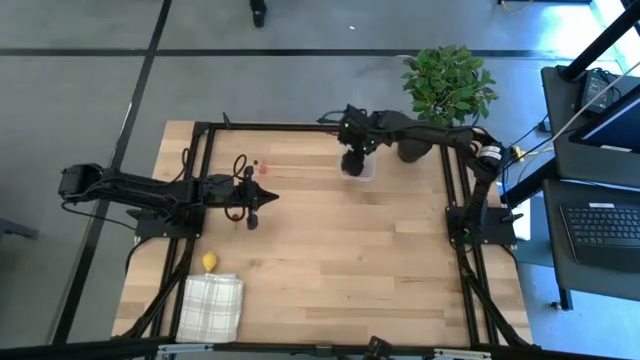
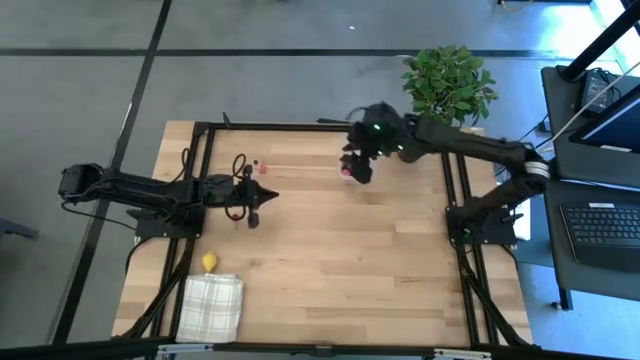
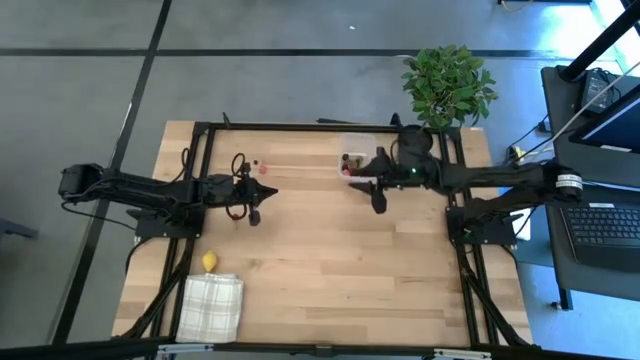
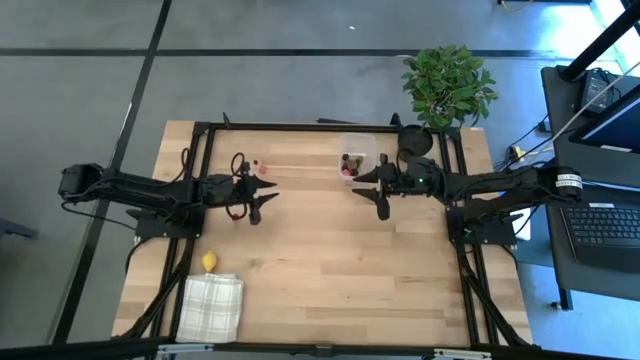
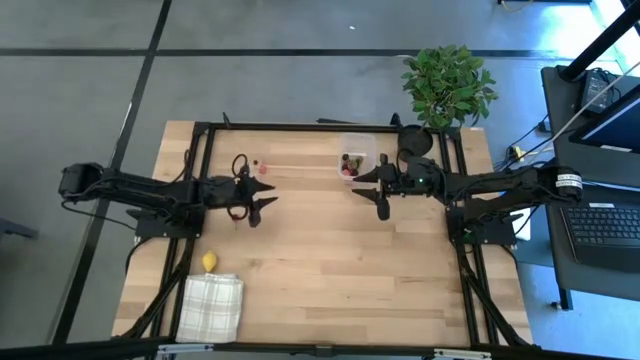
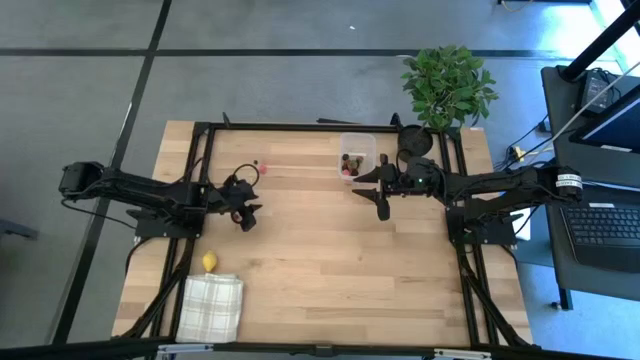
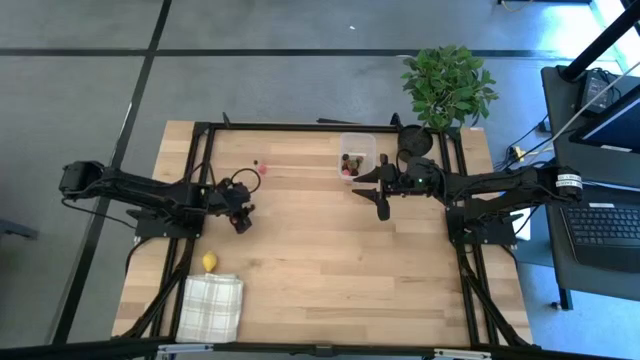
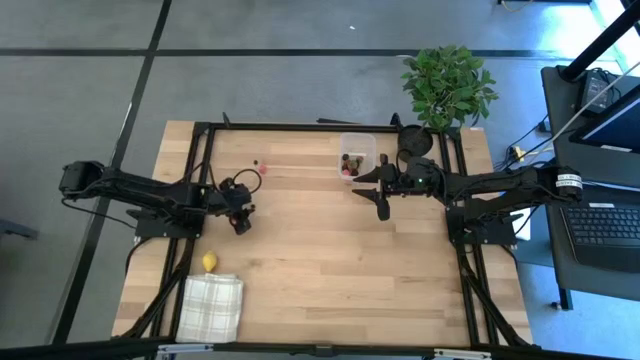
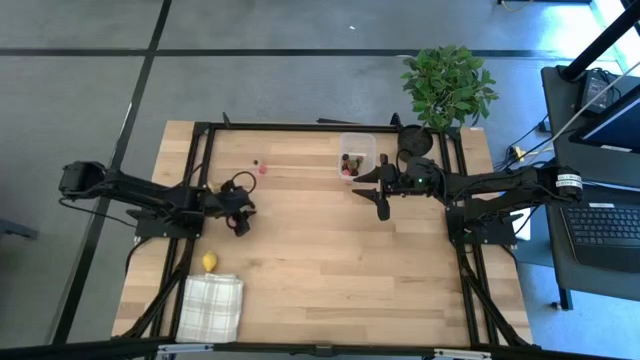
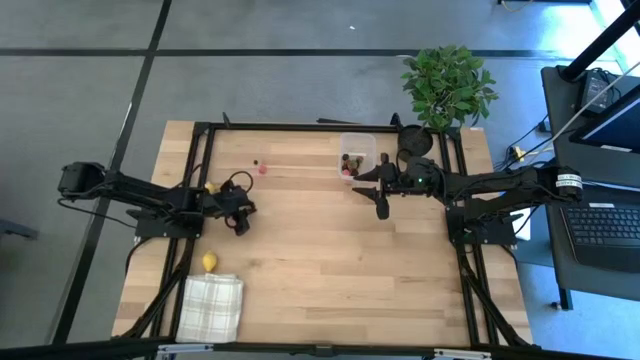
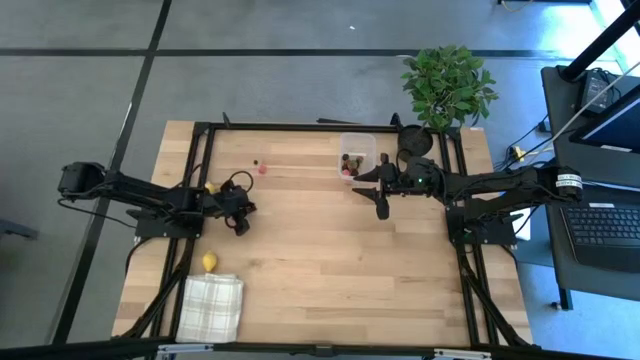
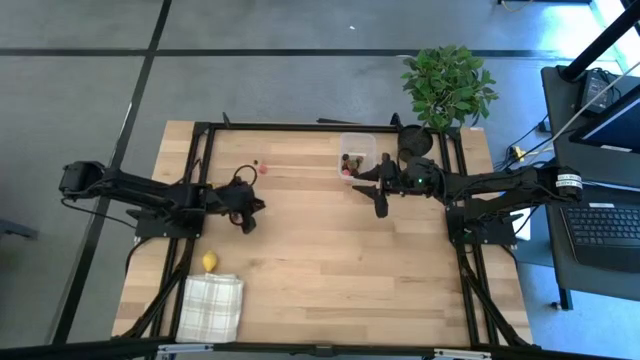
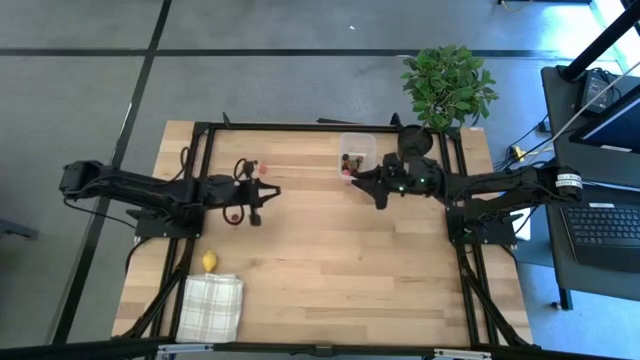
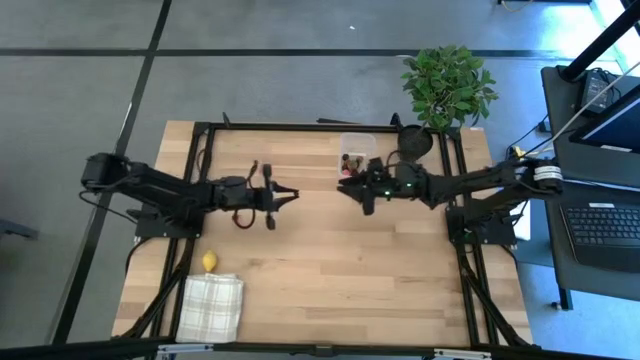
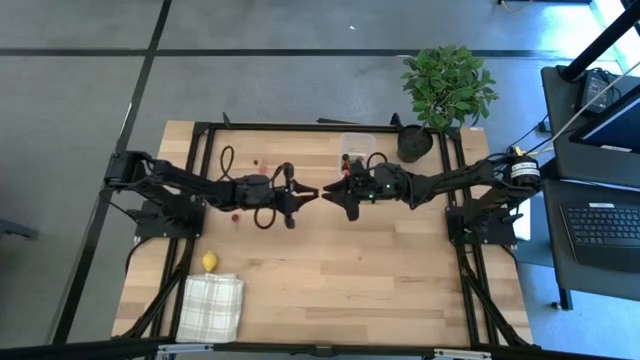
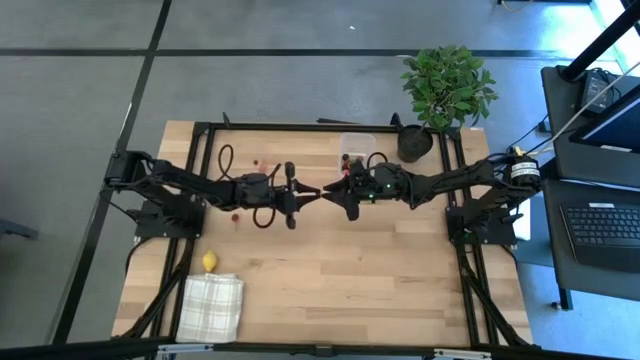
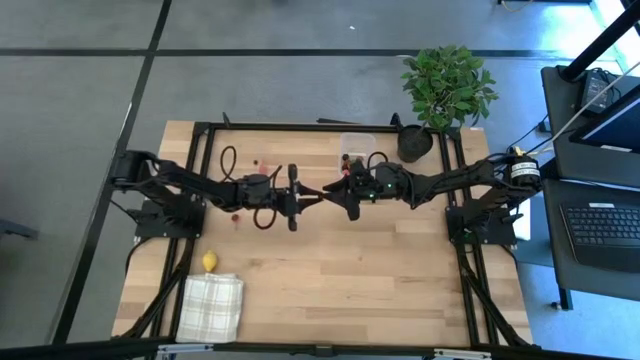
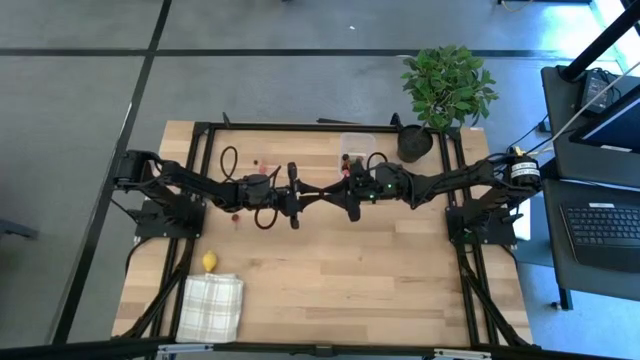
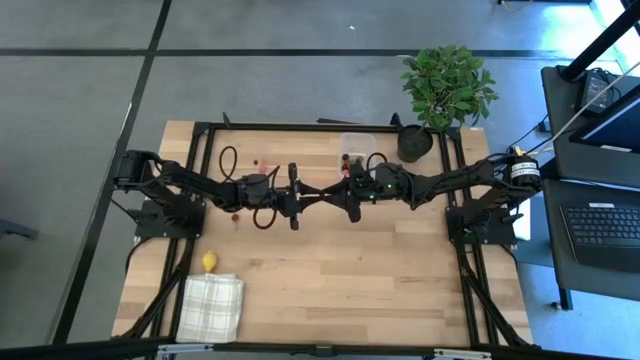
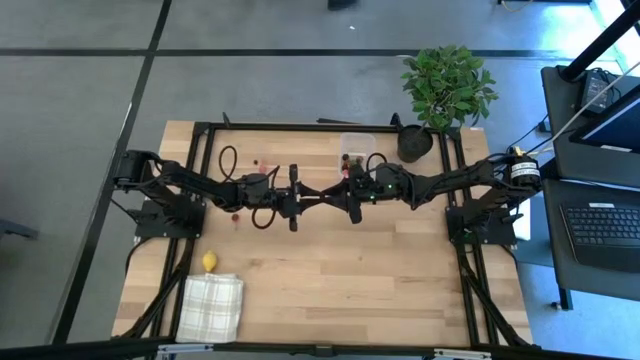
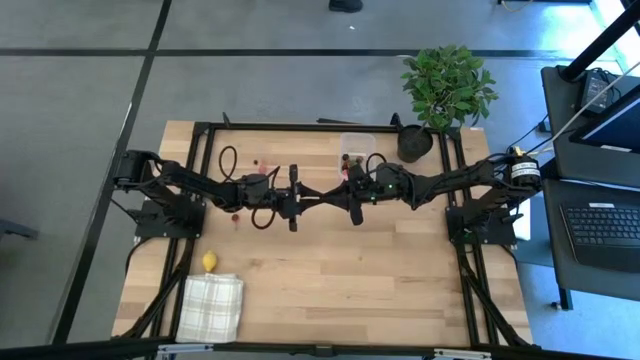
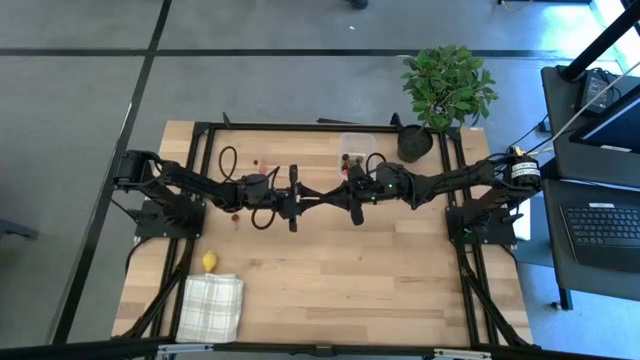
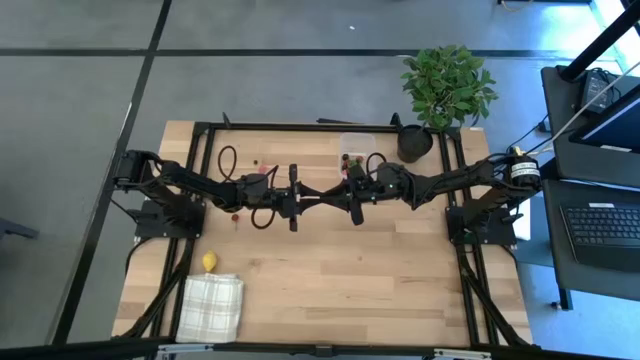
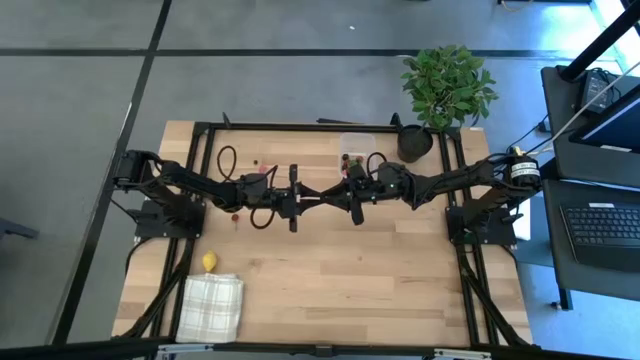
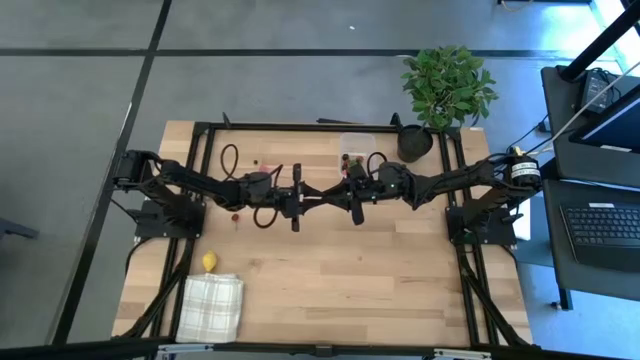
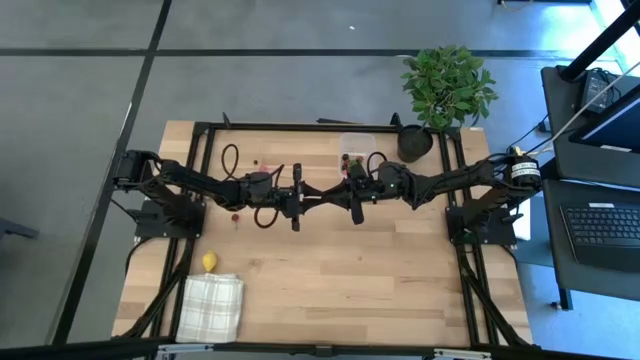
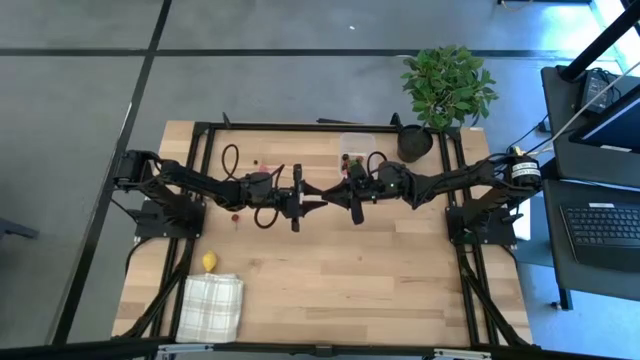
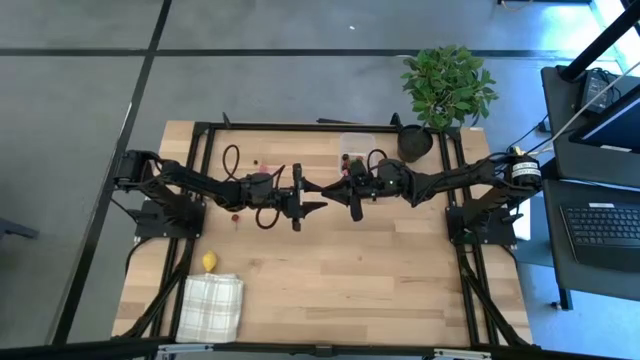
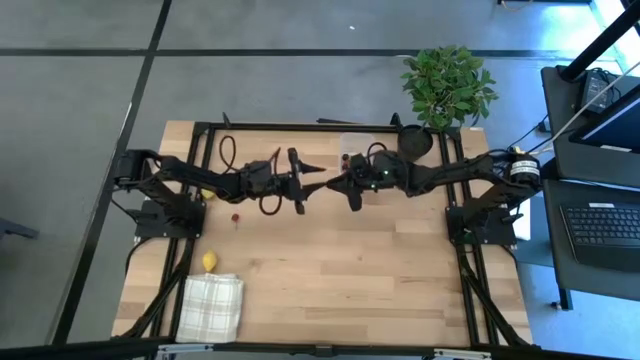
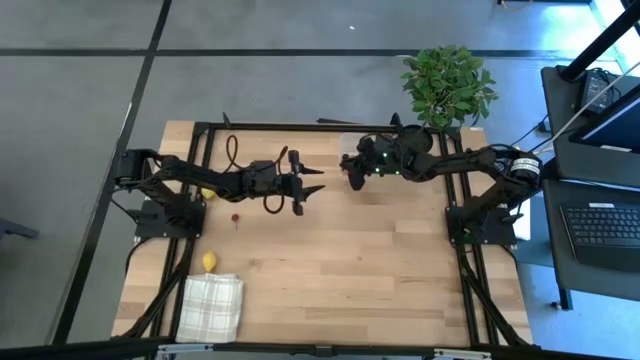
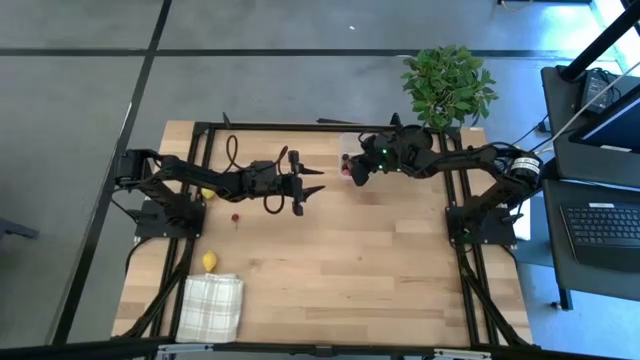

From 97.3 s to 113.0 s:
Task: Pick and placing Produce into tupperware
Put the bottom blueberry into the transparent bin

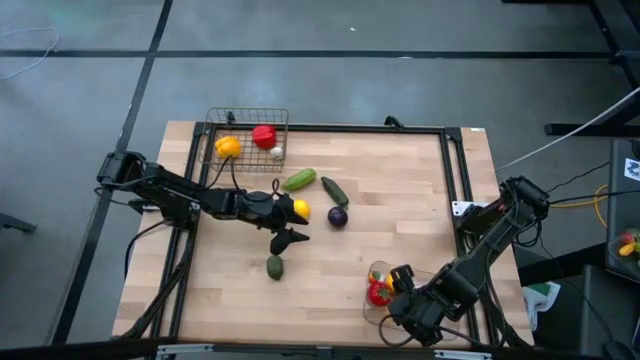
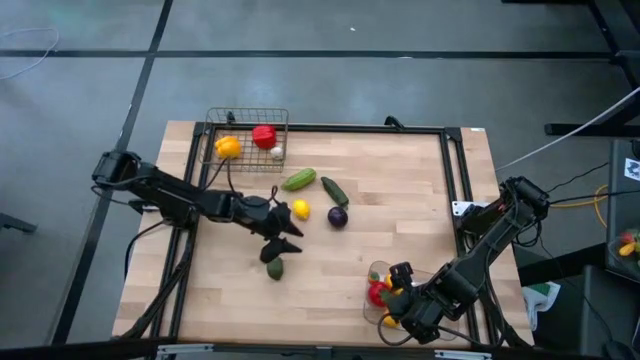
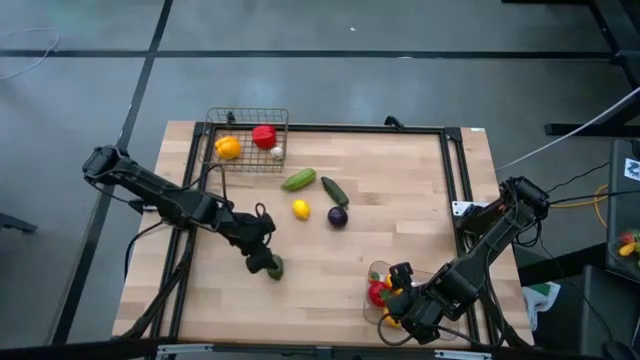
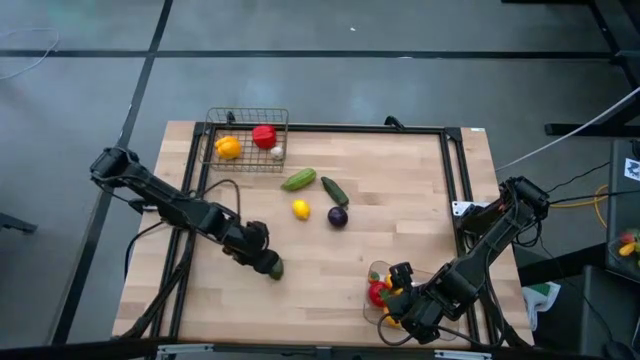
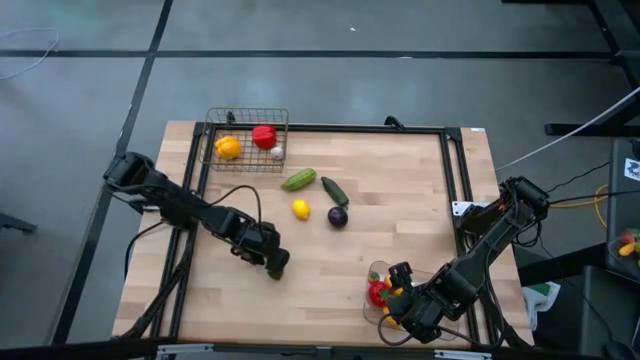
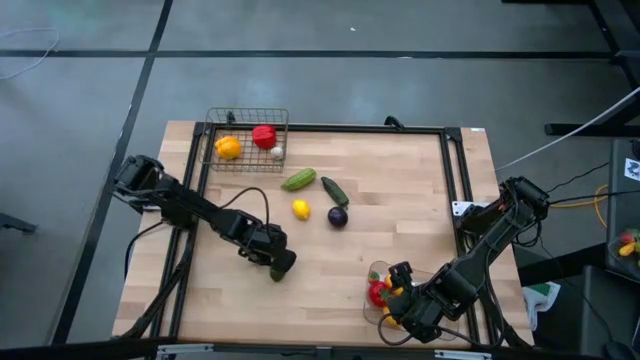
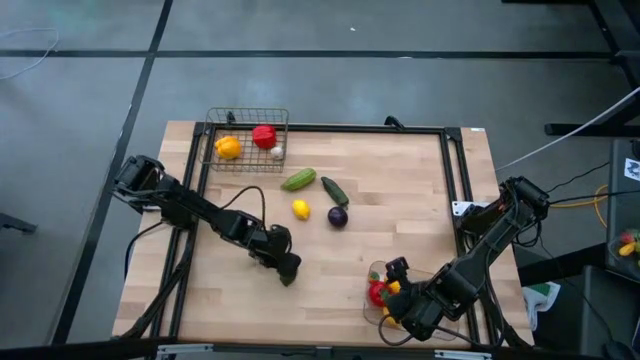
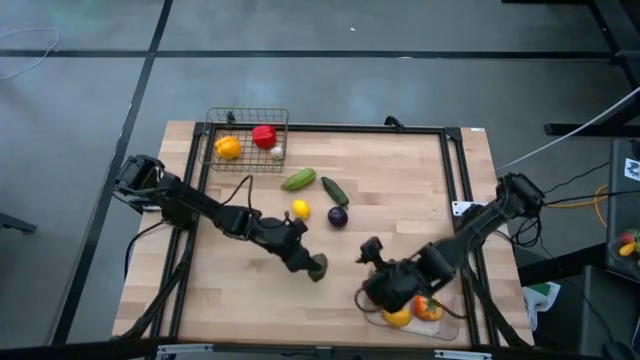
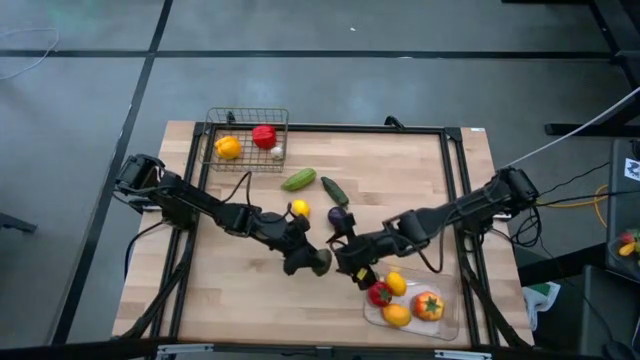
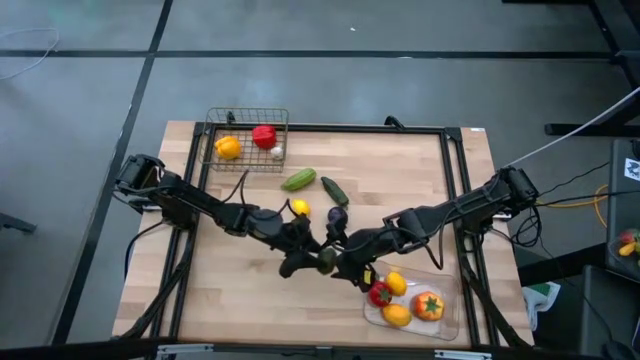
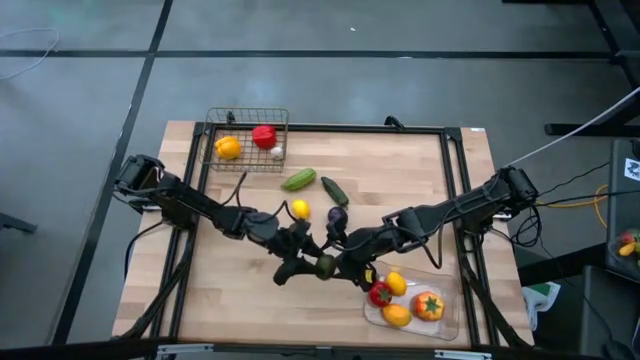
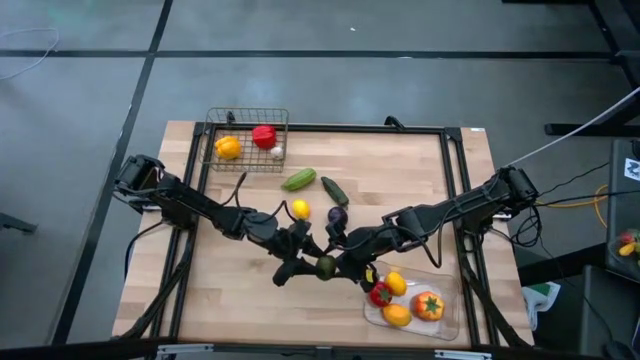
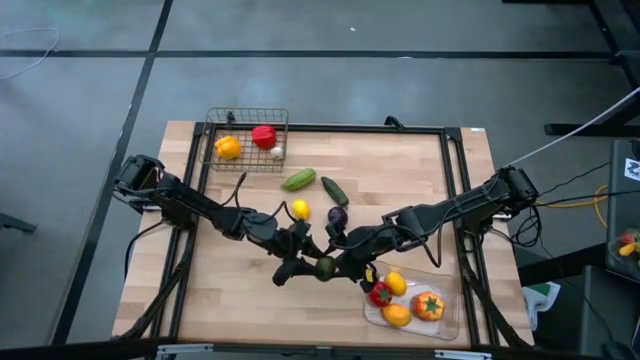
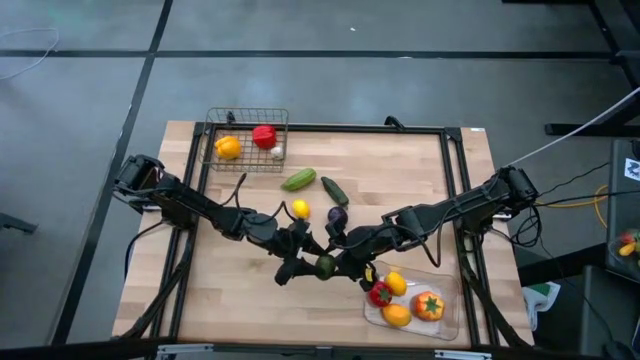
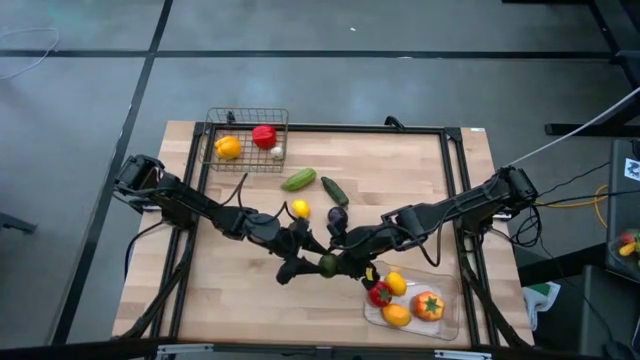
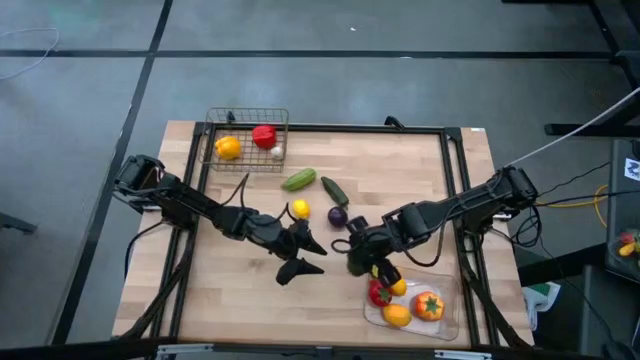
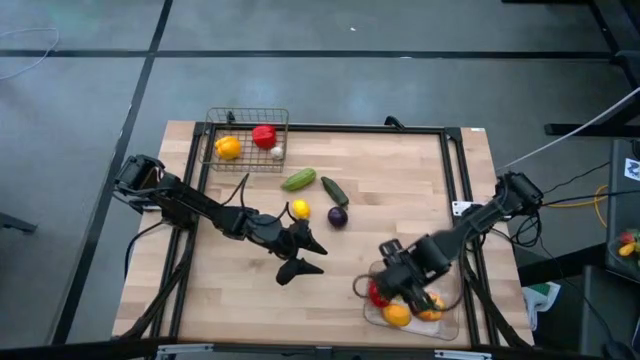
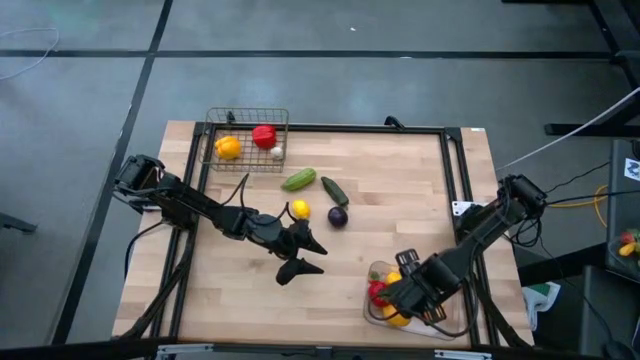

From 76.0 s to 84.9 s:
Task: Sort produce into baskets
Put the avocado into the transparent bin
